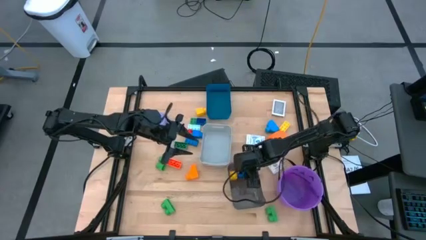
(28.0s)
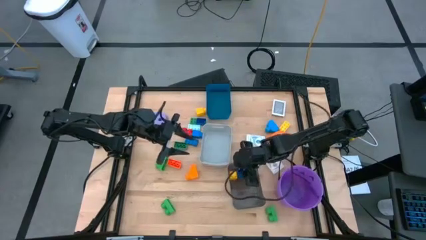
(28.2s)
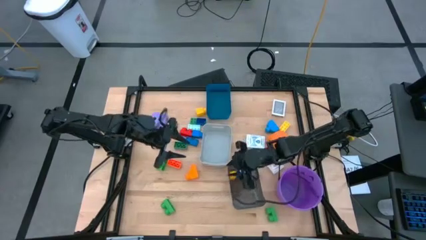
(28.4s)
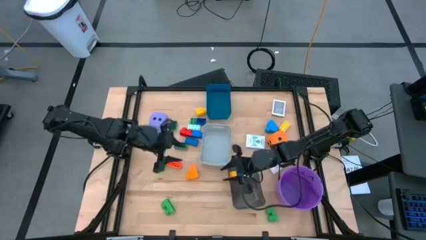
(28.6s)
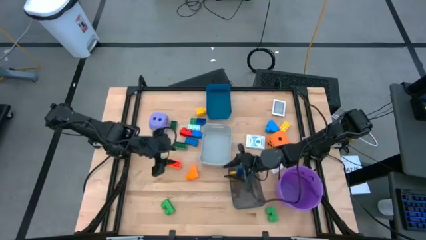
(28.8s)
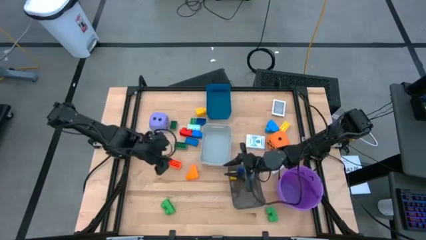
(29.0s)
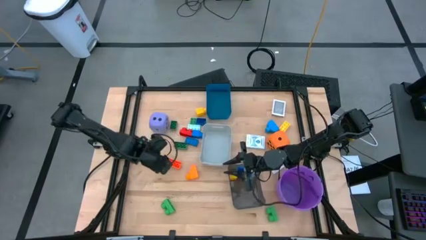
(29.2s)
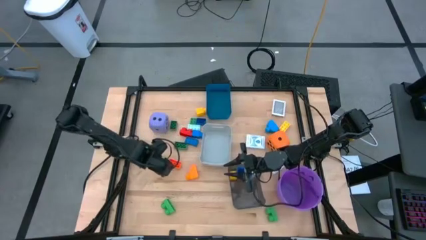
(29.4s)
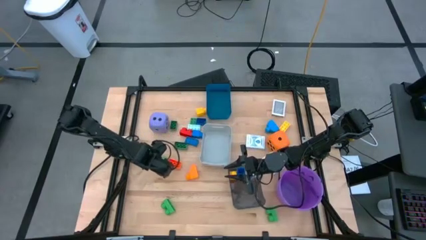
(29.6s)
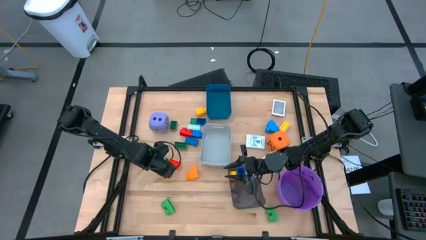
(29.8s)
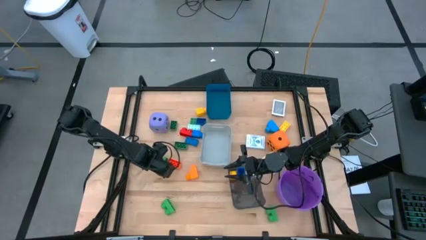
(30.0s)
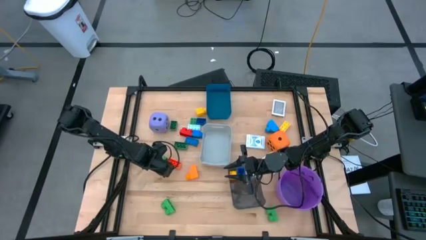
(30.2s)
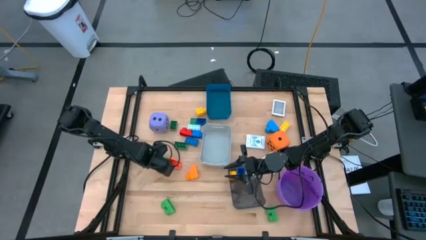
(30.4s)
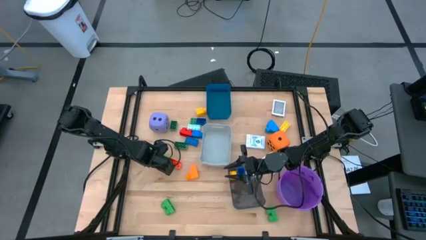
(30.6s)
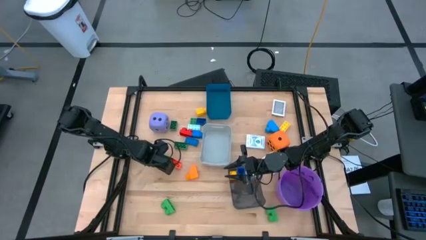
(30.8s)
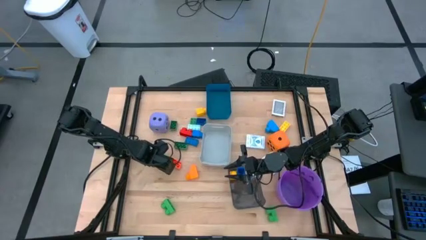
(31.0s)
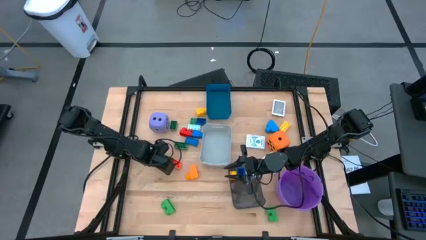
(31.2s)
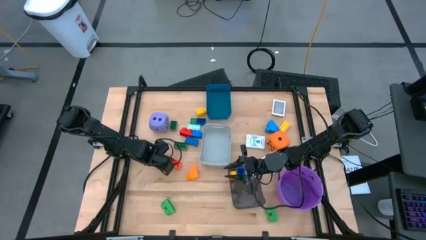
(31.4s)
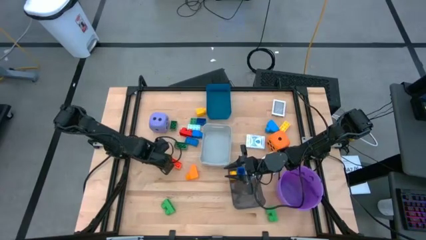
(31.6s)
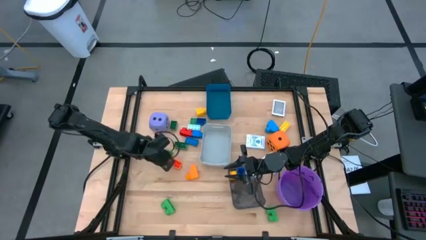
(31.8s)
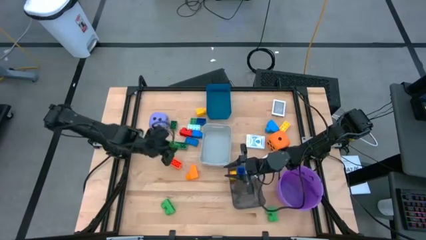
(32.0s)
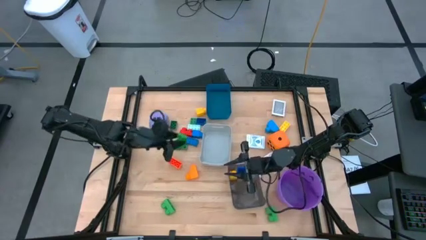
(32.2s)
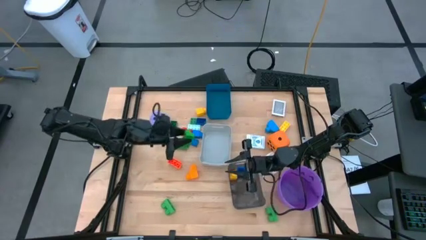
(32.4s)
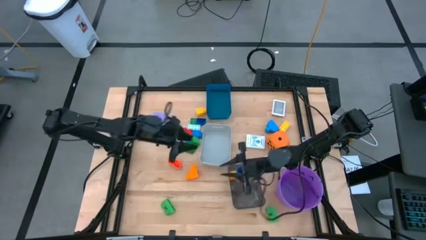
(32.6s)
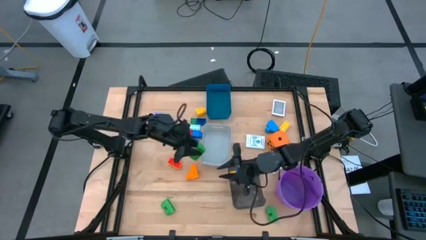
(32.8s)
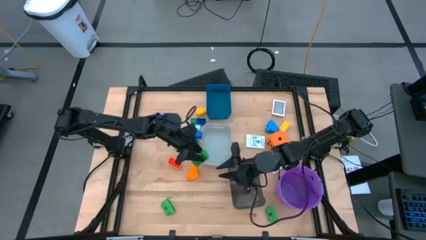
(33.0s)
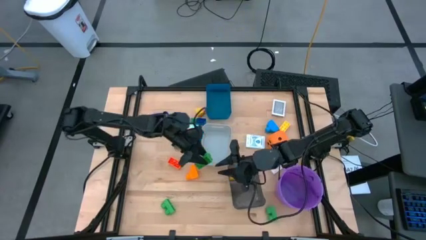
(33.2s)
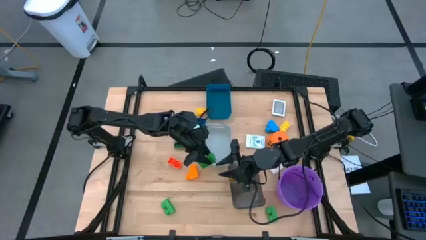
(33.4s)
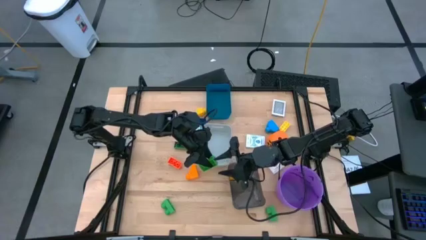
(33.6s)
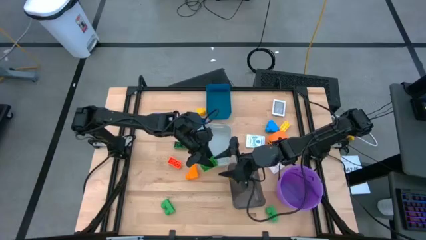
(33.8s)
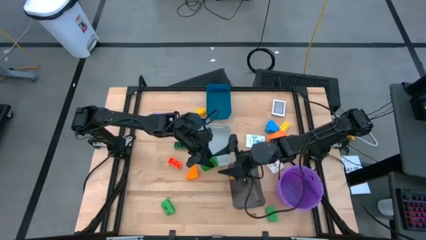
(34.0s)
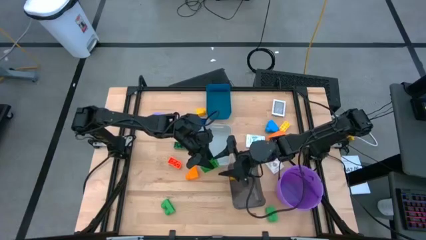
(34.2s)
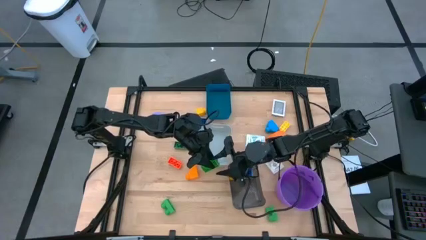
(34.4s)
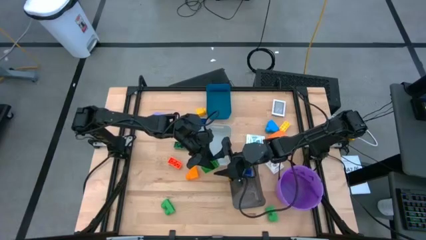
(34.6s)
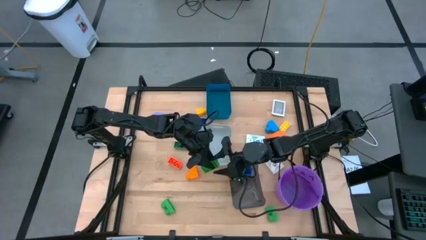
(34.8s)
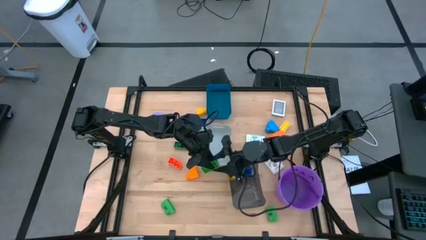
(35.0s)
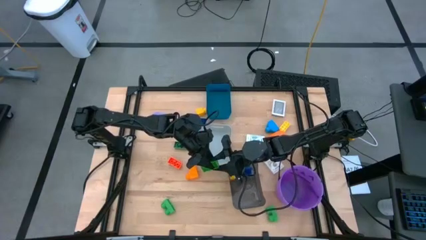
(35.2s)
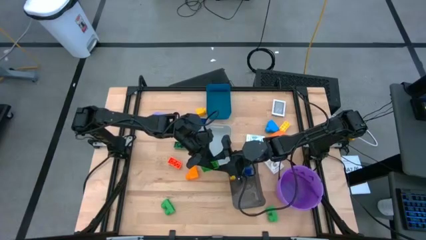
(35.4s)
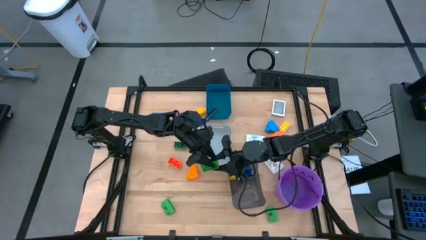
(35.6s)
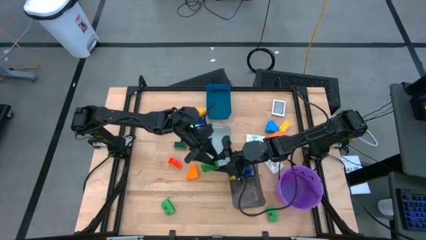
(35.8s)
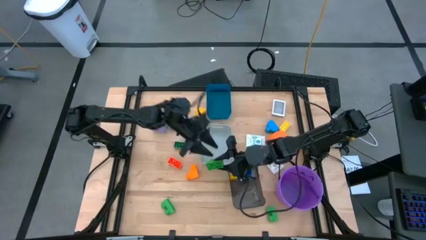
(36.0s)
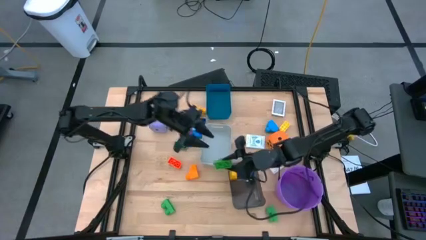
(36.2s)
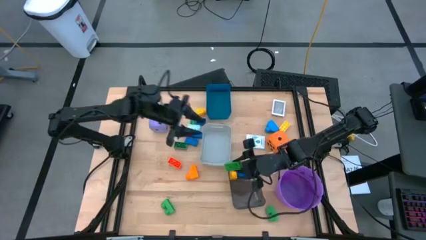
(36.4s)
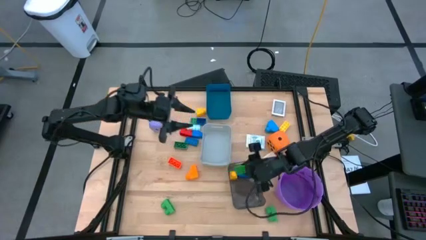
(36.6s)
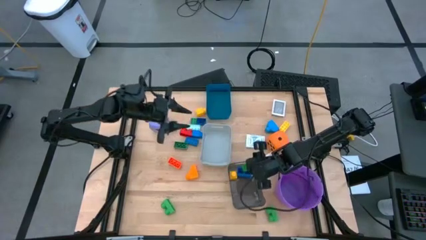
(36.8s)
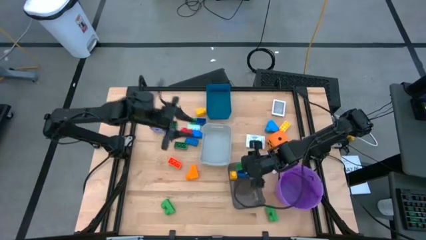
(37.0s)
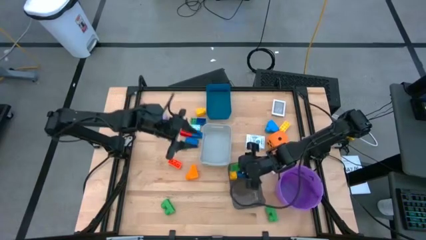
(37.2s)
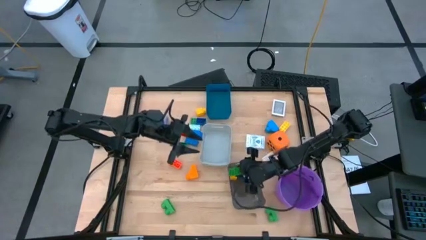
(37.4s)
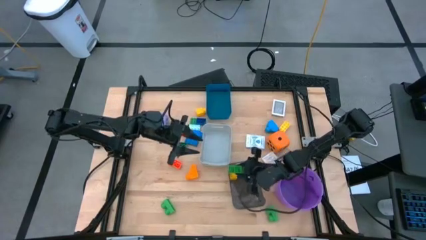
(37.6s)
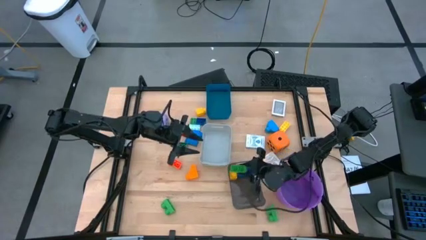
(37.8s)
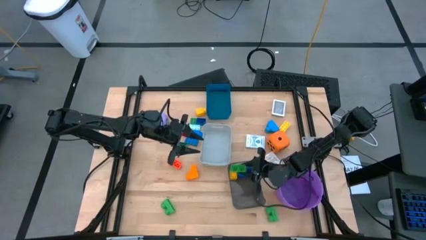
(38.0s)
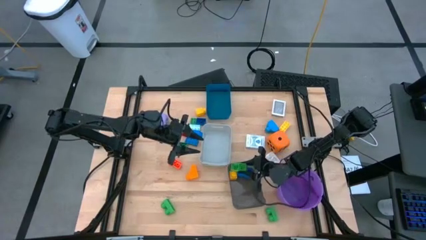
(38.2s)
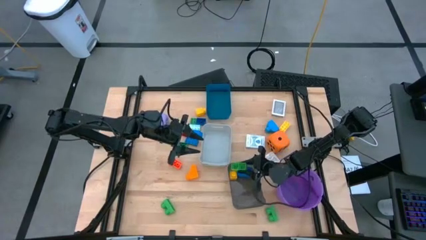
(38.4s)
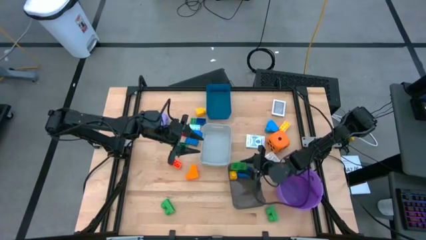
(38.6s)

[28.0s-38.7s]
Task: Pick & Place Toys
Put the green game piece into the black bin
